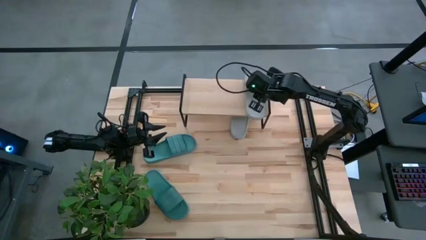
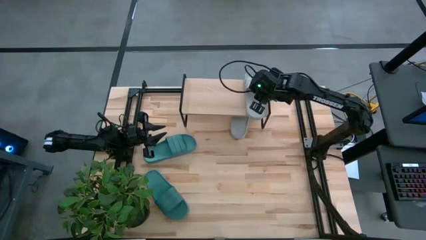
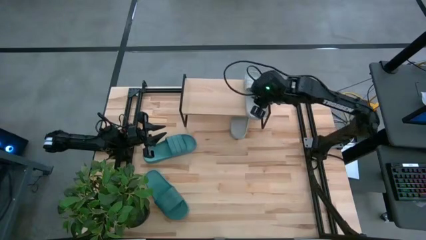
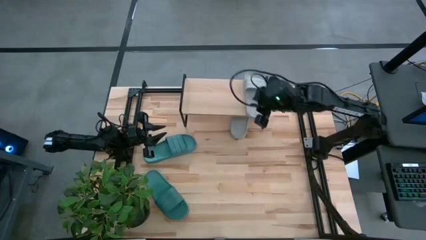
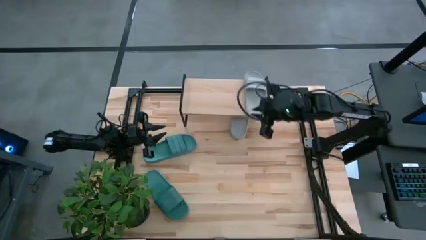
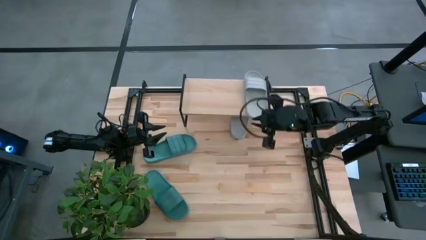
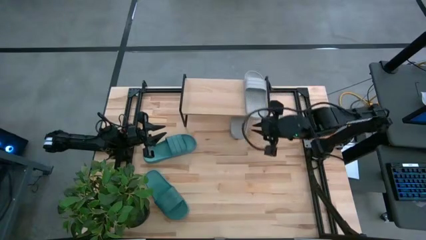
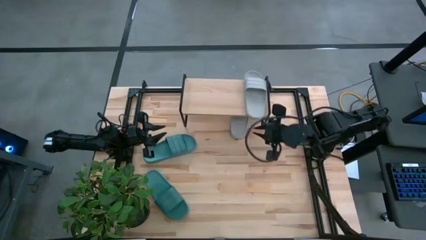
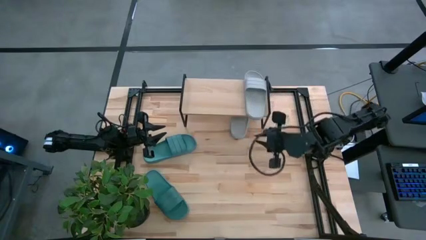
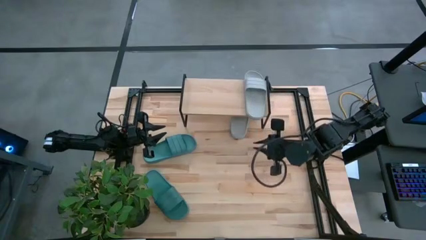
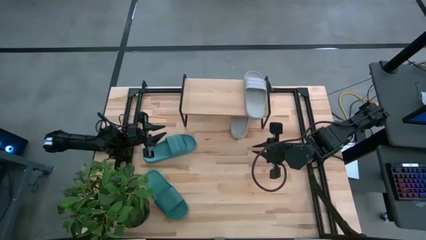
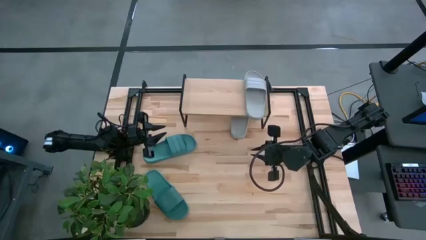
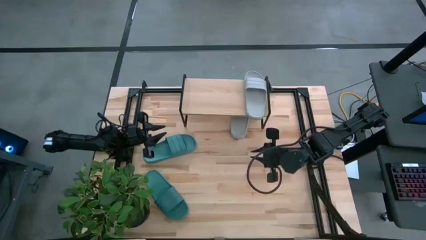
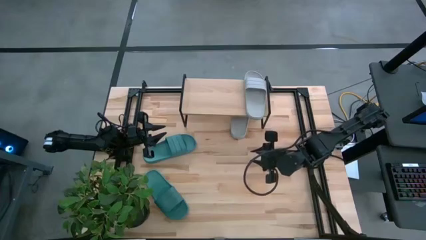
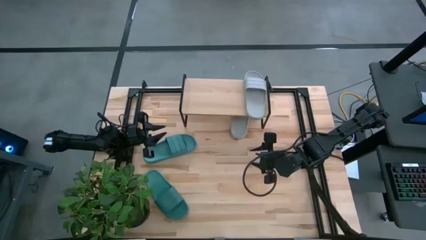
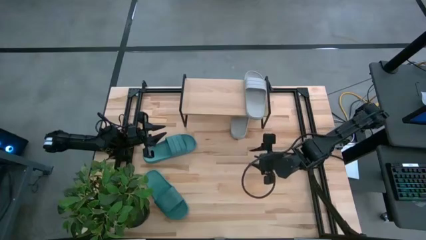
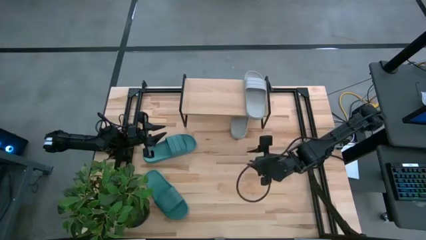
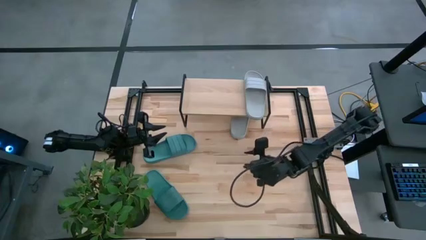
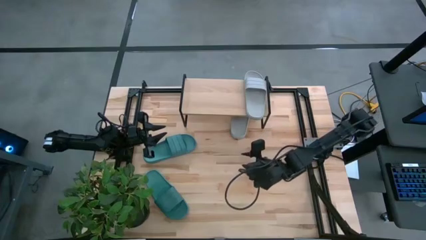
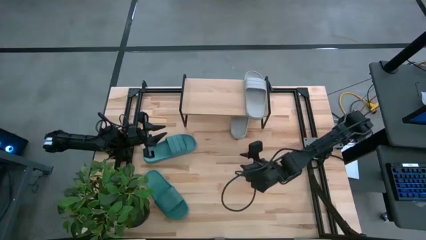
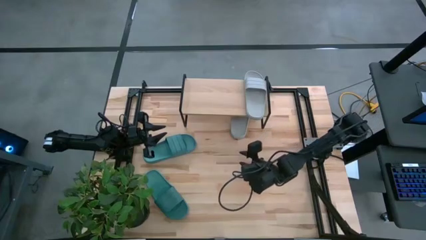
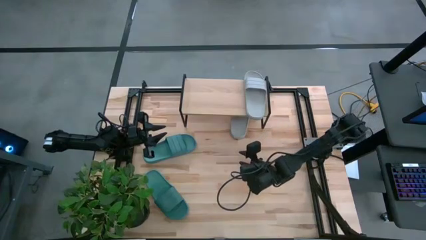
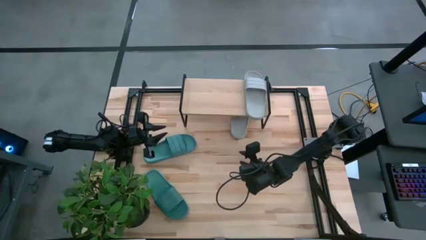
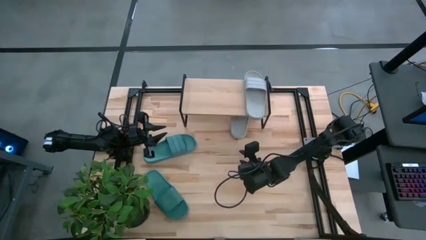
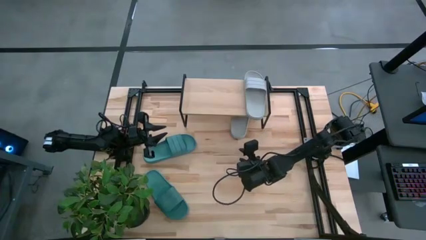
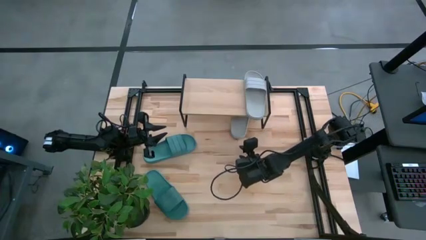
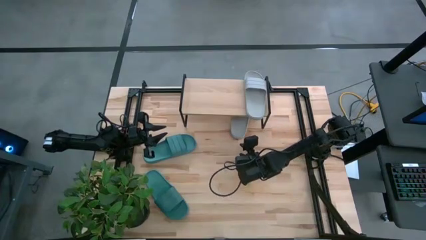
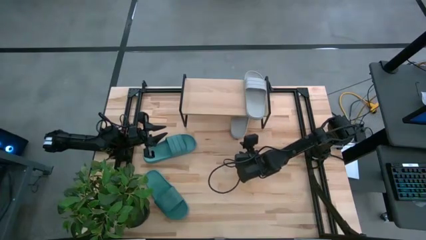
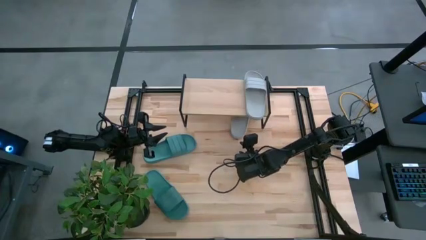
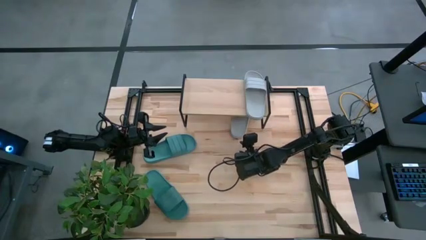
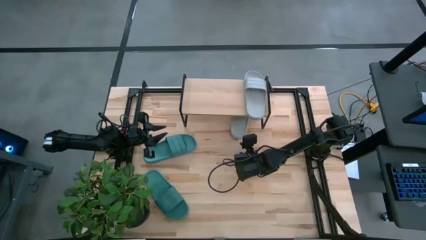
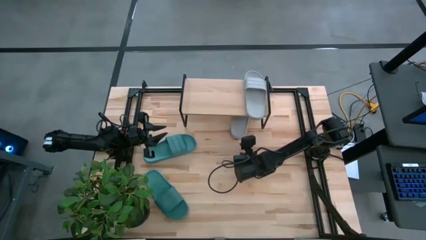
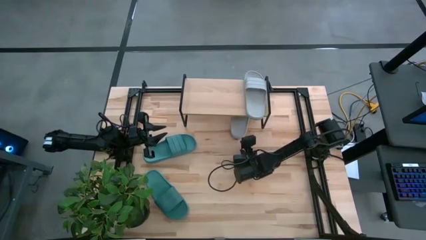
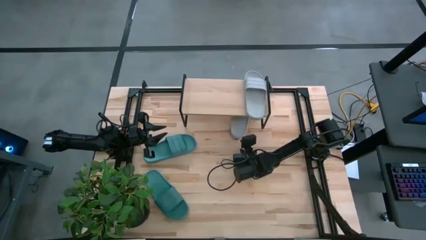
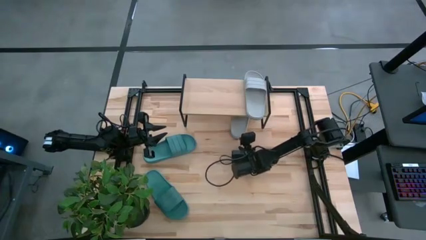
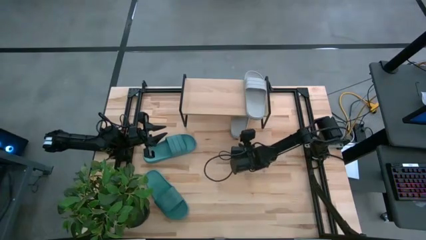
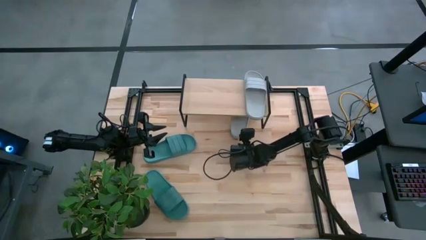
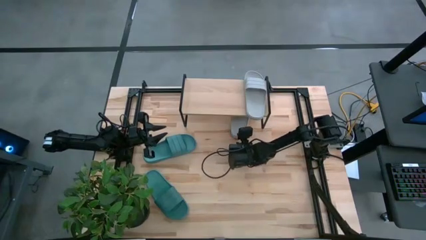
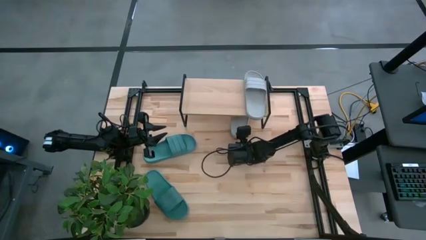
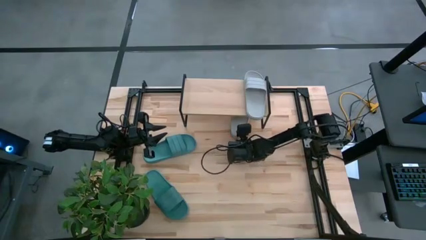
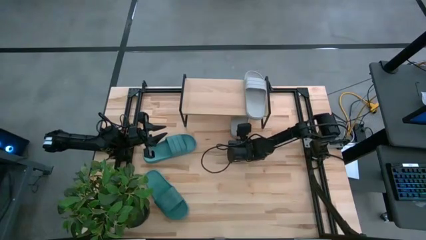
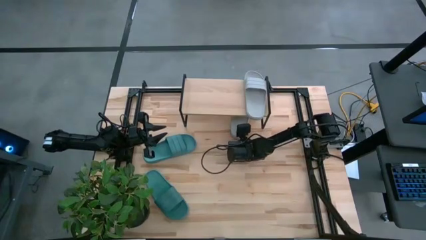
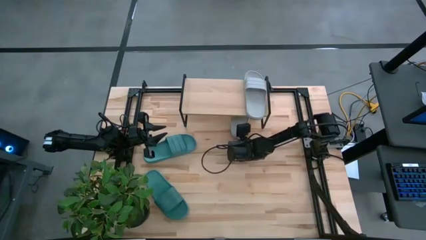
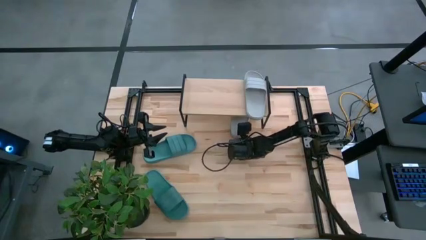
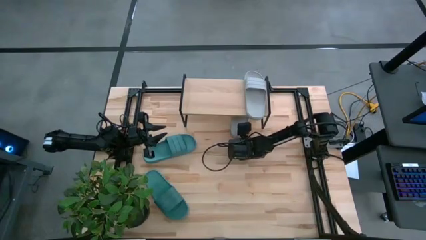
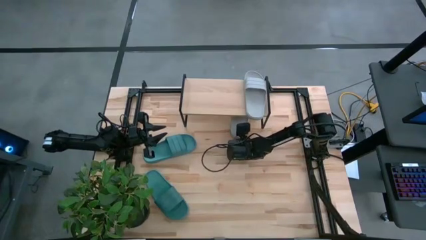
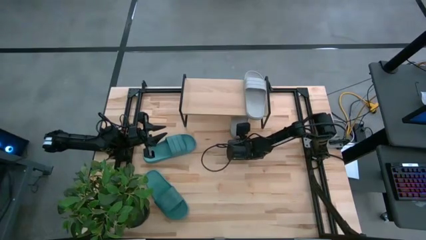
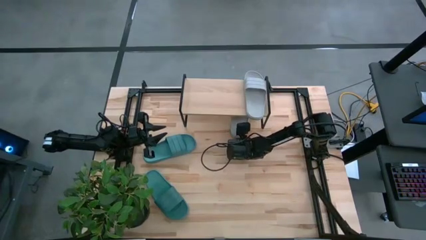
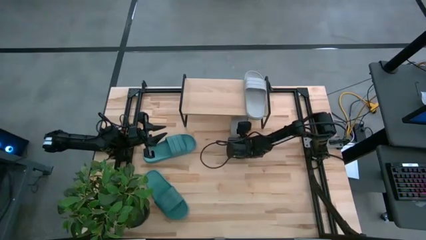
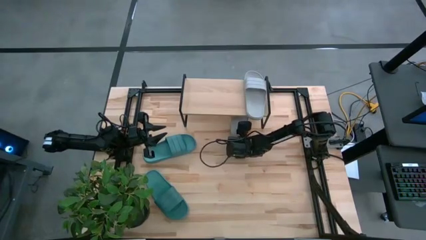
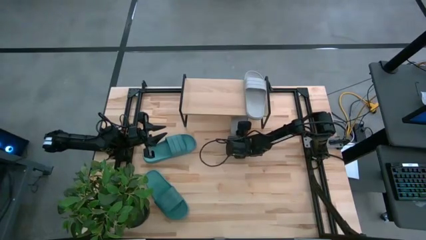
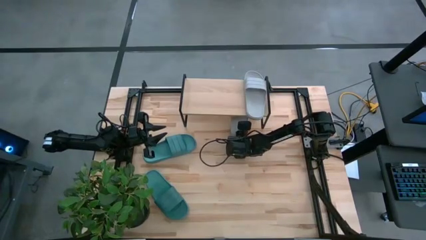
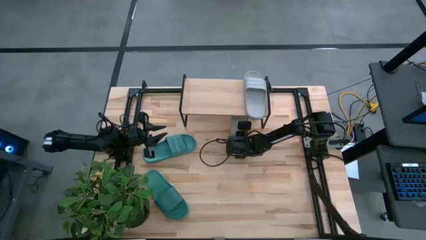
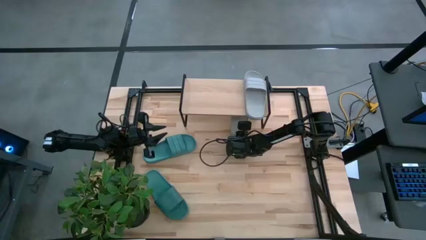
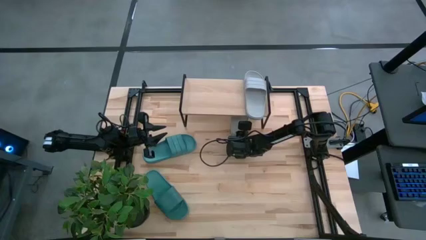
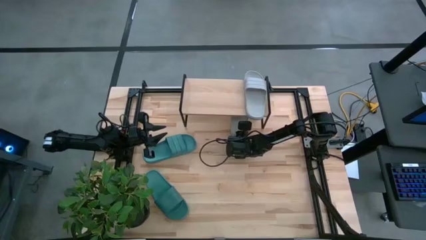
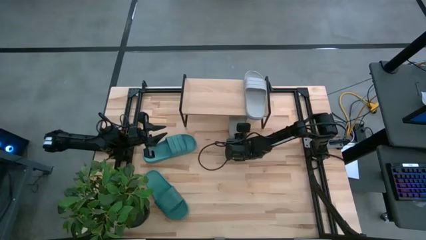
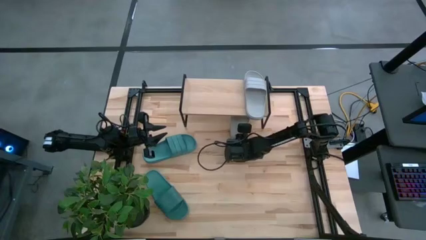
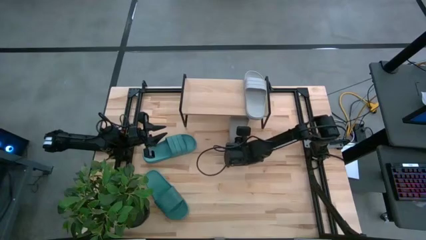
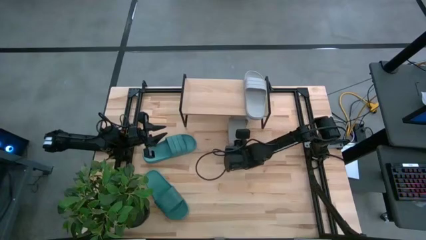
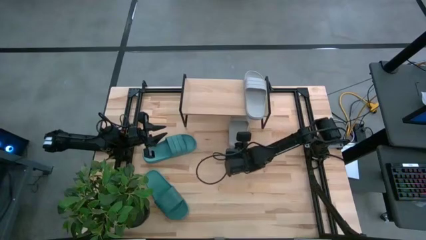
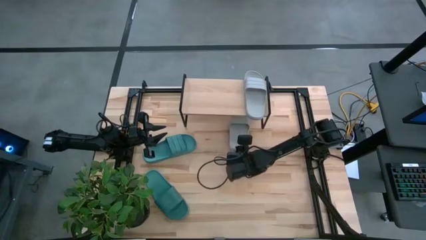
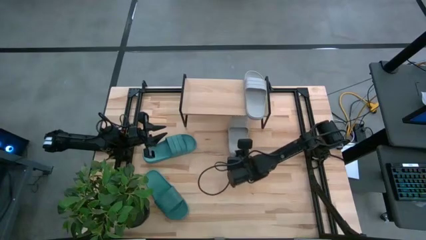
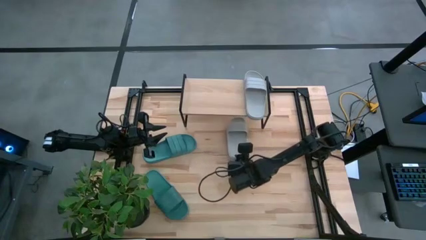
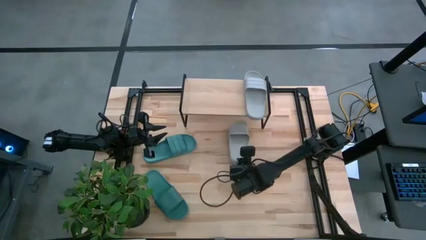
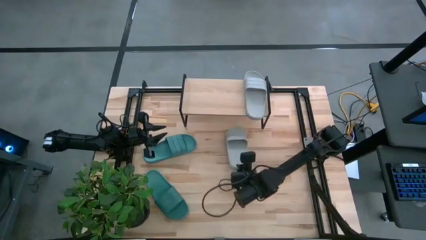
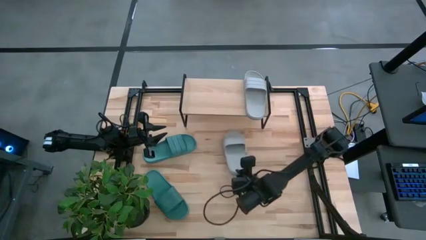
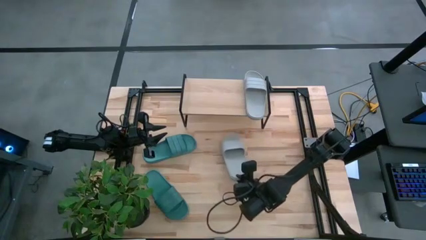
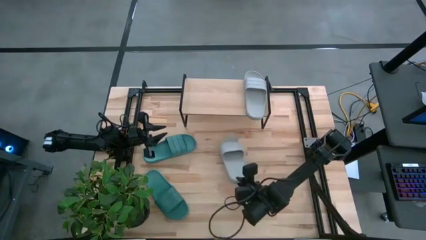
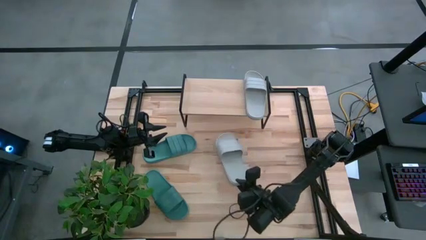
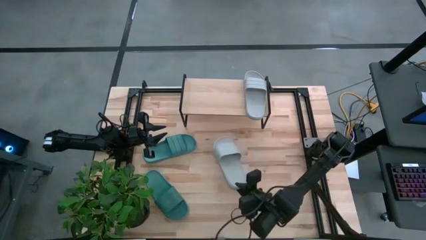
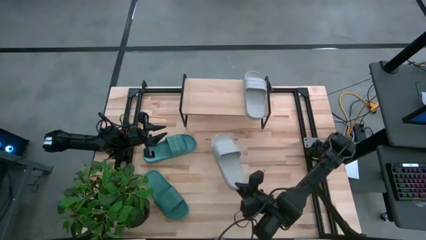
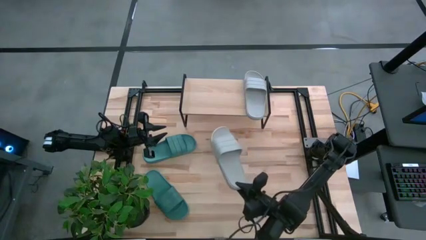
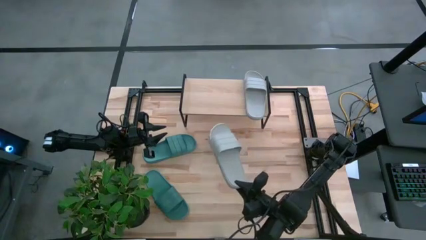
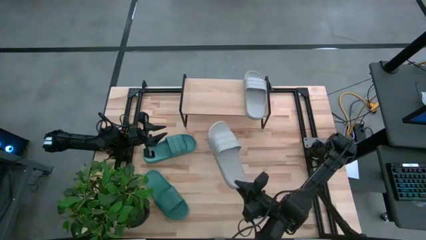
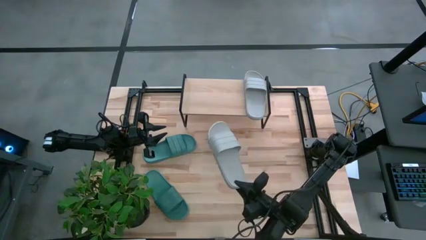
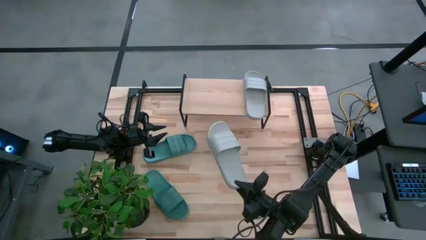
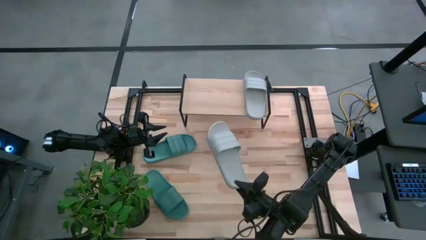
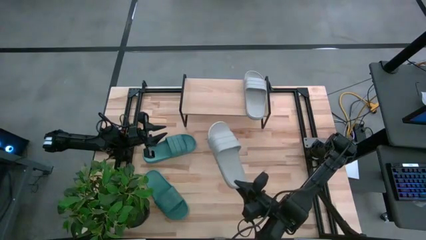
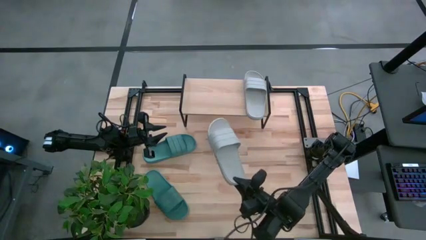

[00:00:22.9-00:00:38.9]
Task: Pick and place slides into the shelf
Put the gray slipper on the shelf
